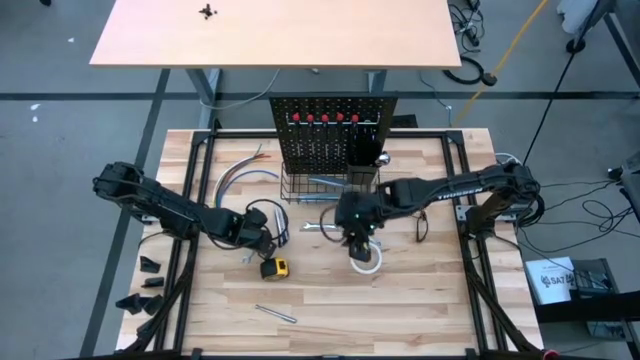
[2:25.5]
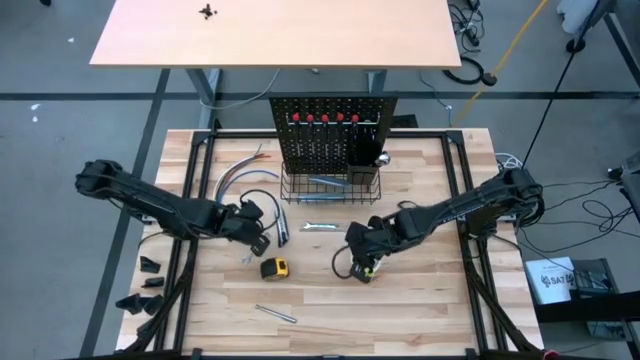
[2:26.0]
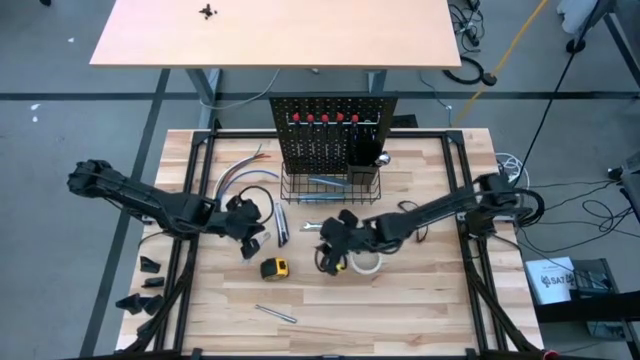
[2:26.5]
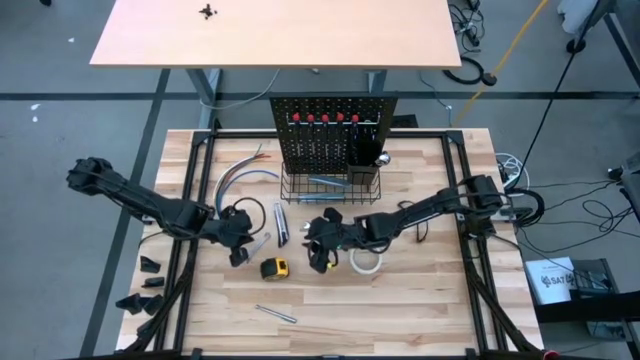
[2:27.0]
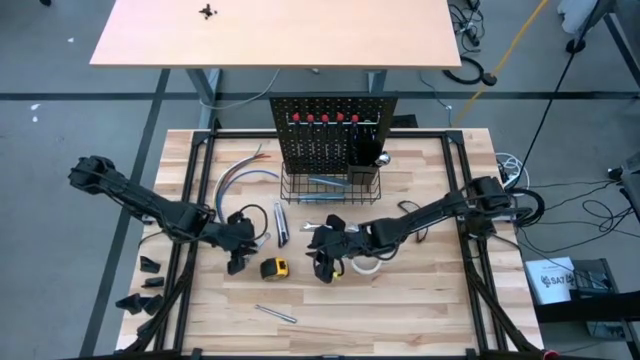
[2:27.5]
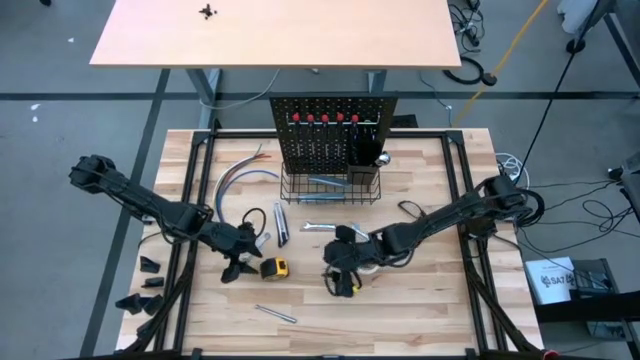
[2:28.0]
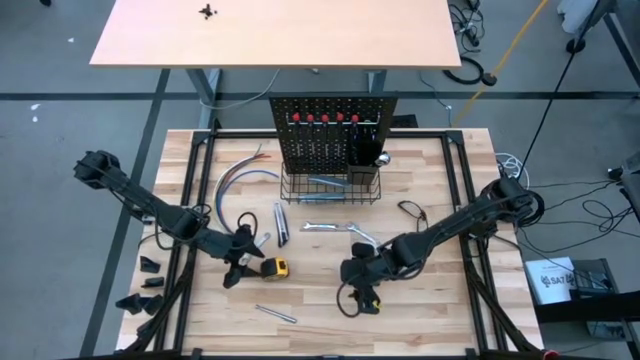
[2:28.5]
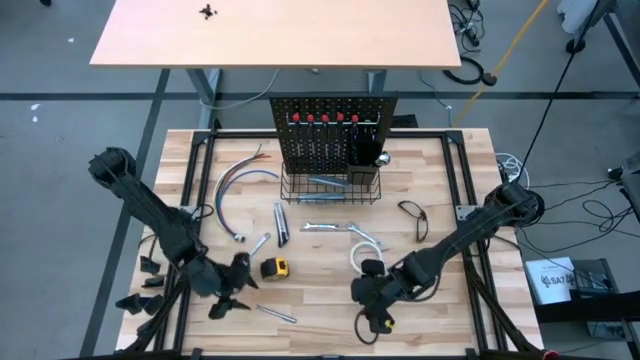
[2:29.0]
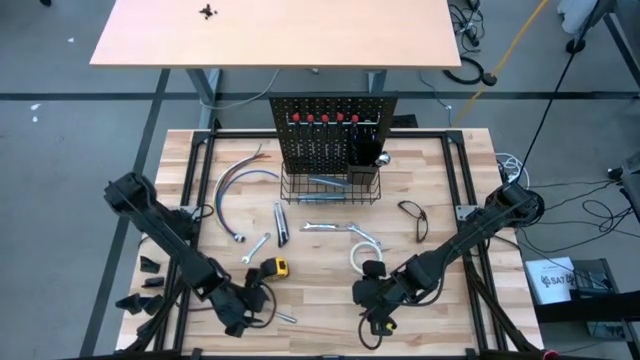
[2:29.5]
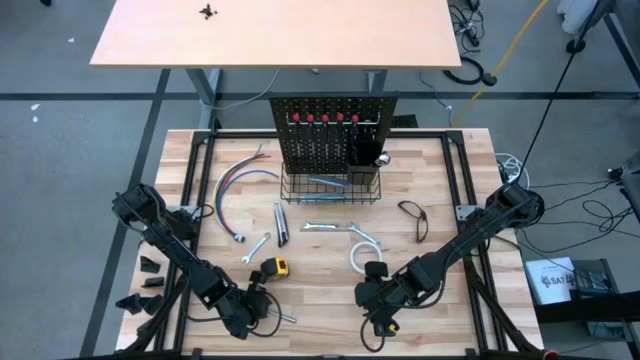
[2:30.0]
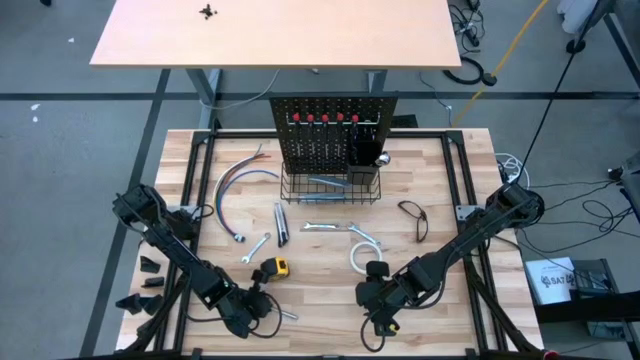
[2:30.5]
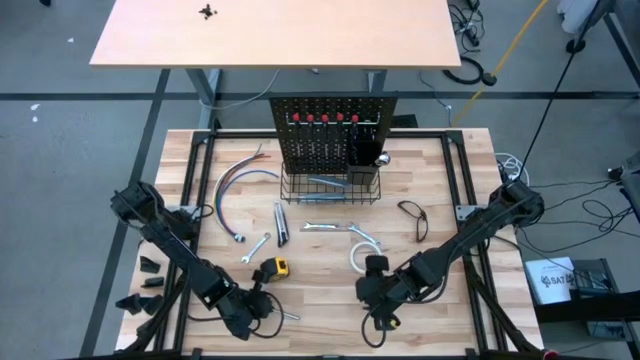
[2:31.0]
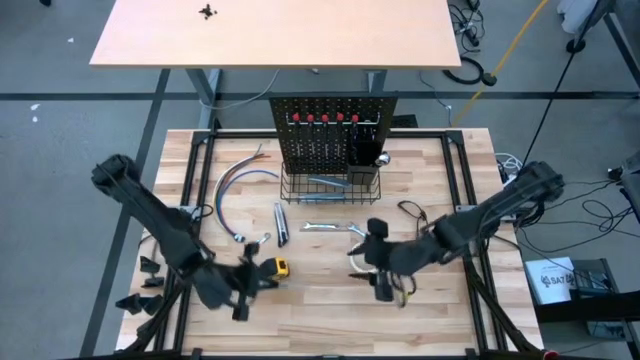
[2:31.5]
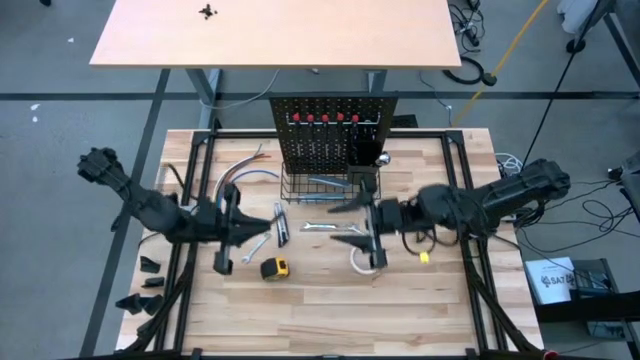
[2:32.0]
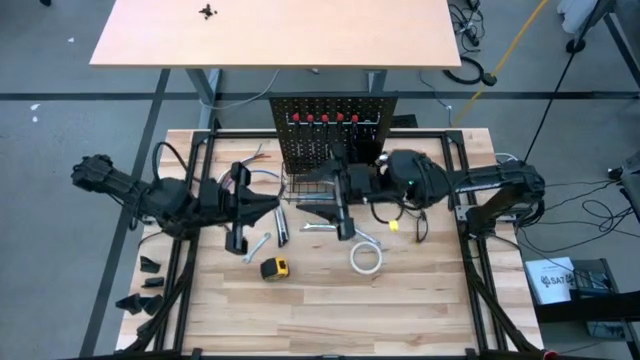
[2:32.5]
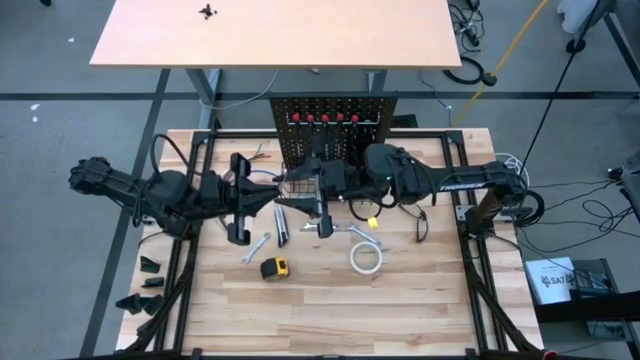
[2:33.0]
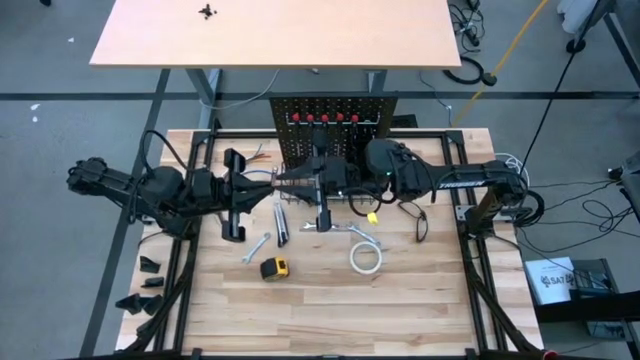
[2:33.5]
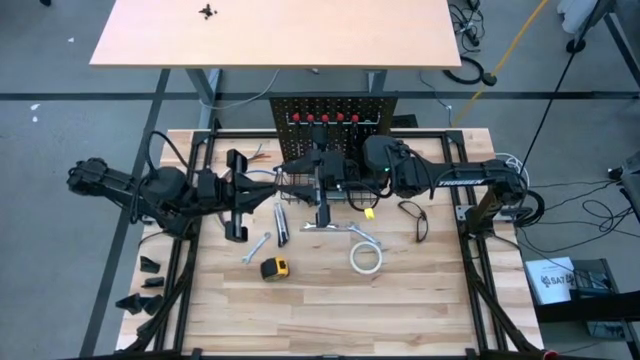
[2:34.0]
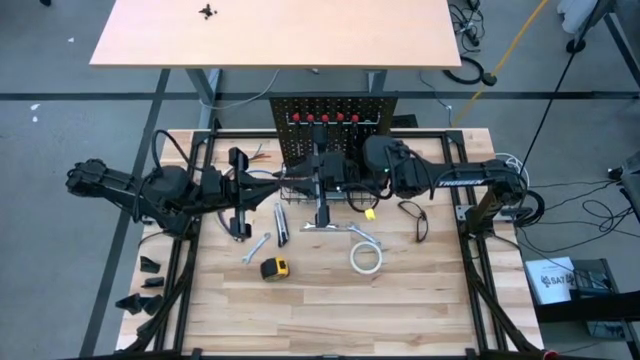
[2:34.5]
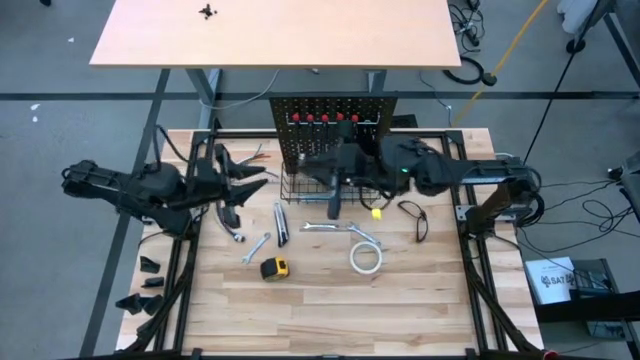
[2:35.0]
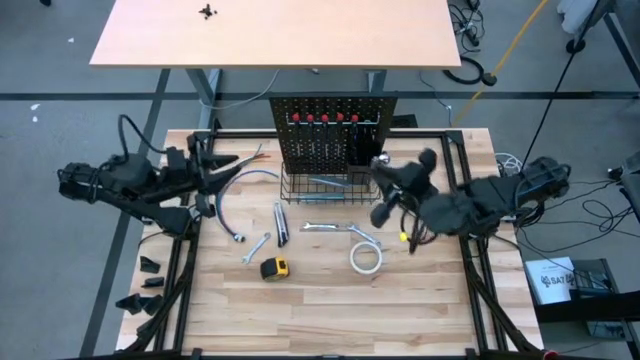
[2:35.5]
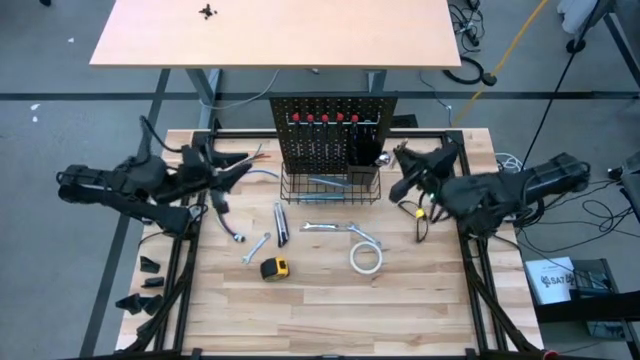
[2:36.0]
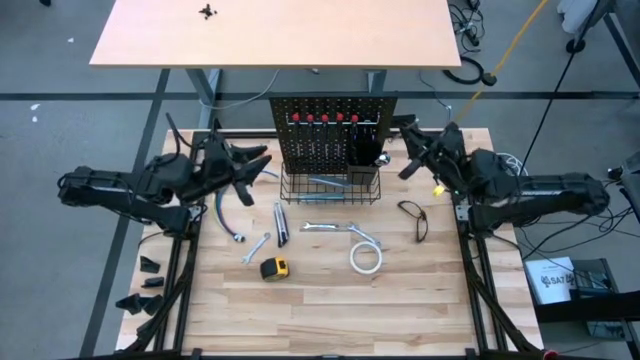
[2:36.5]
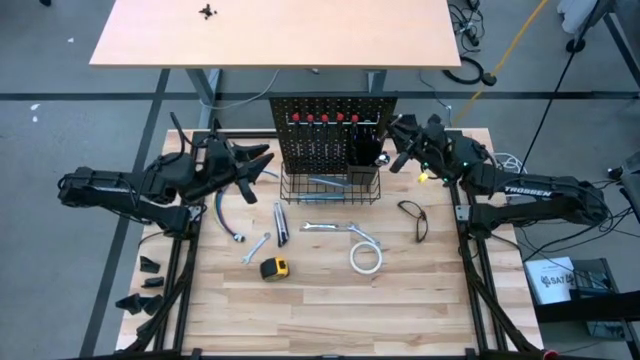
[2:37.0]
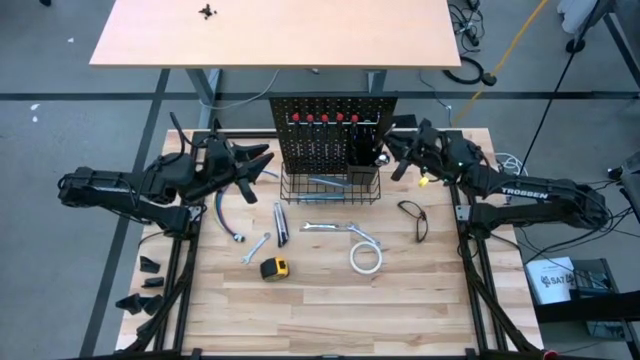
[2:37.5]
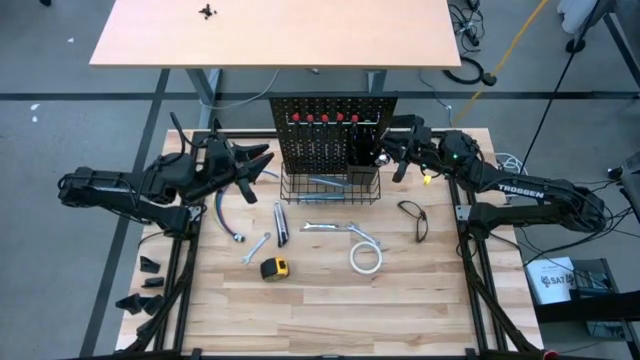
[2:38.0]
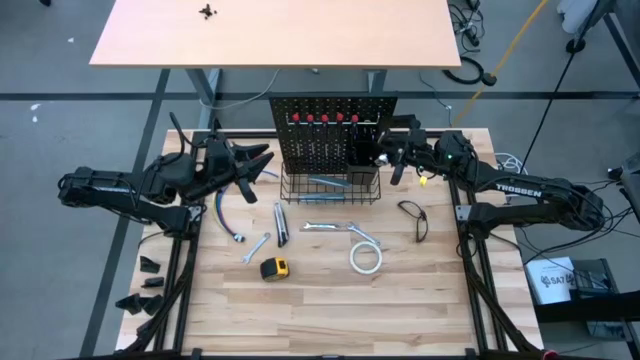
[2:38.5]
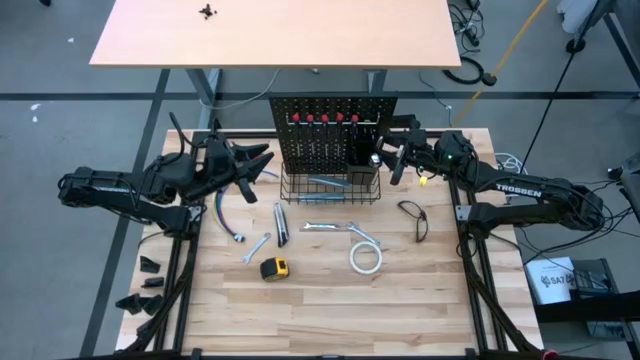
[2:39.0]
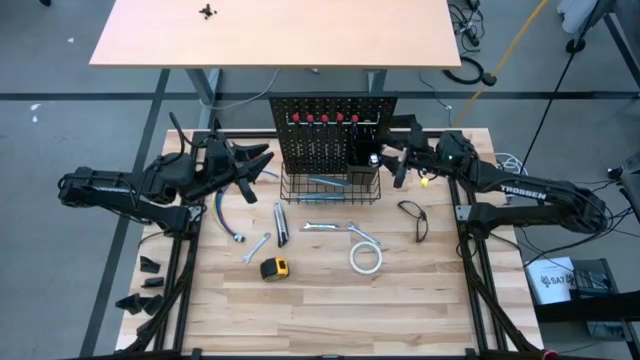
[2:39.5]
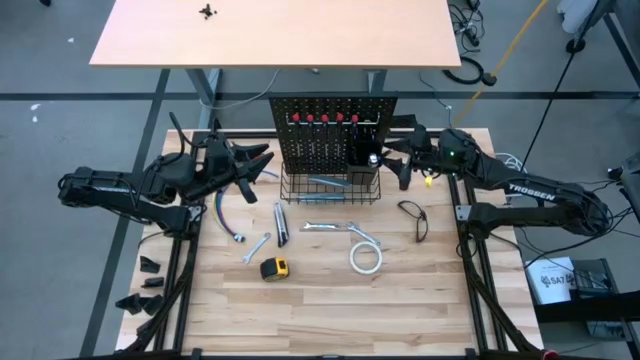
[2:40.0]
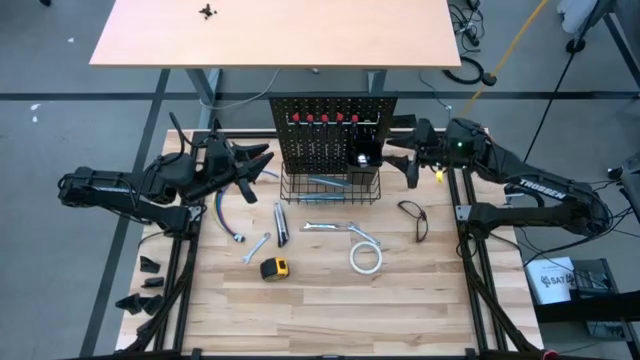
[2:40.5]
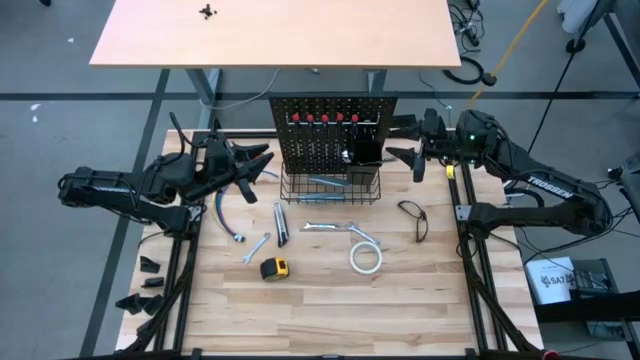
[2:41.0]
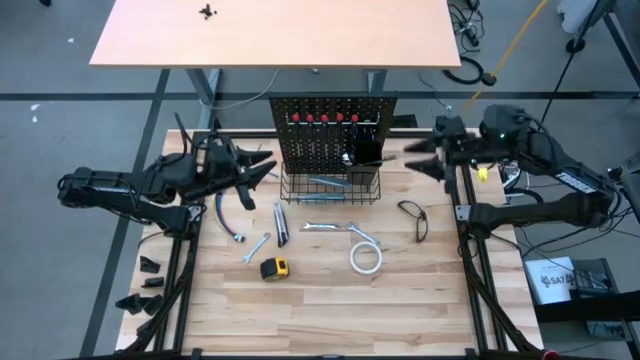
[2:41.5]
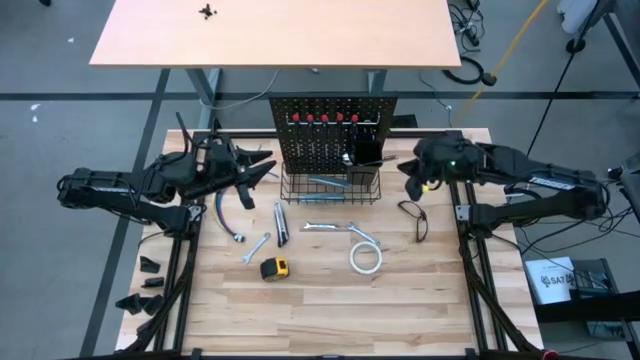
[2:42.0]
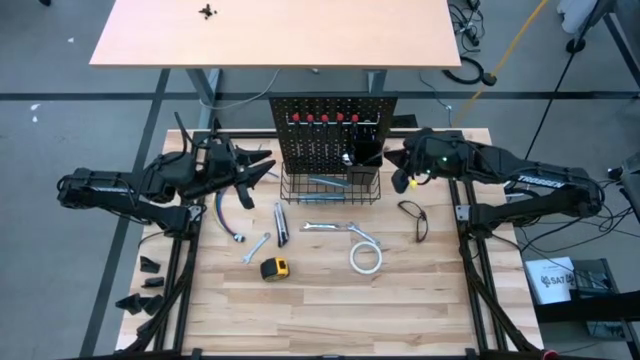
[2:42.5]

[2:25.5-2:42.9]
Task: Hang tools onto peg board
Put the silver pen into the pegboard bin

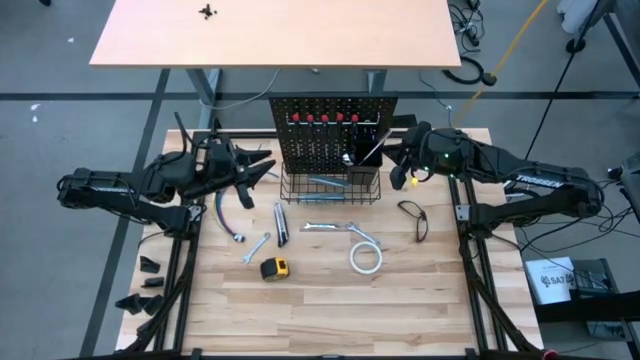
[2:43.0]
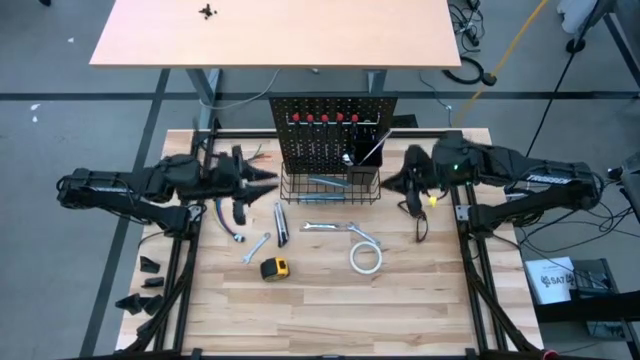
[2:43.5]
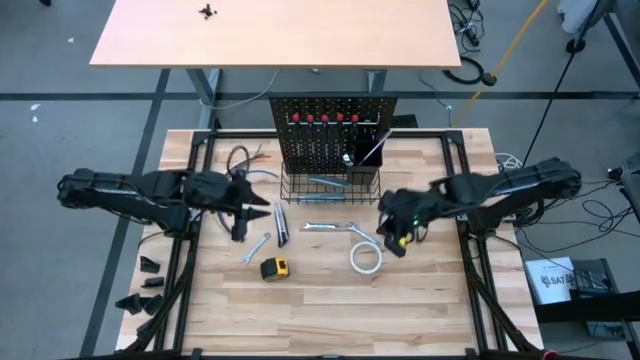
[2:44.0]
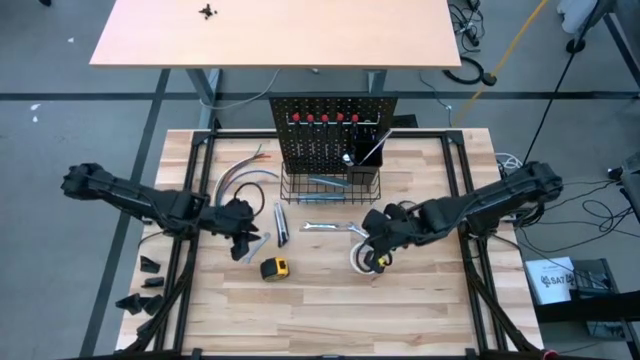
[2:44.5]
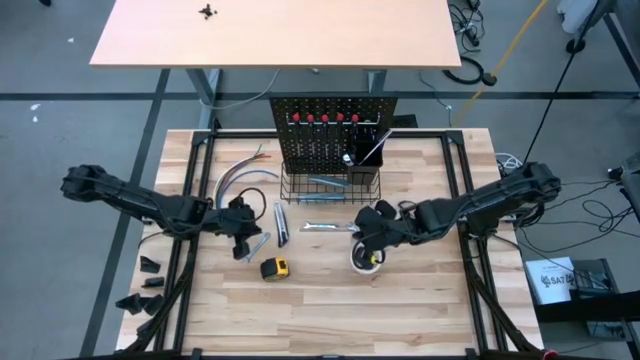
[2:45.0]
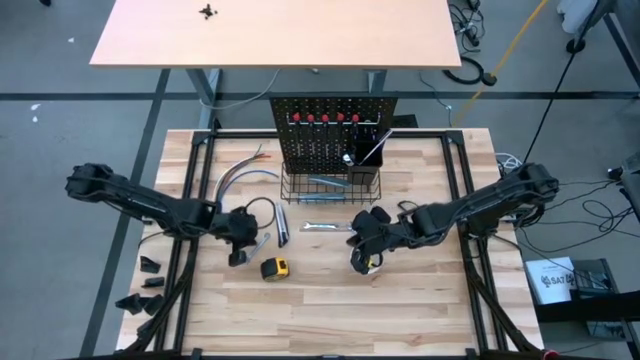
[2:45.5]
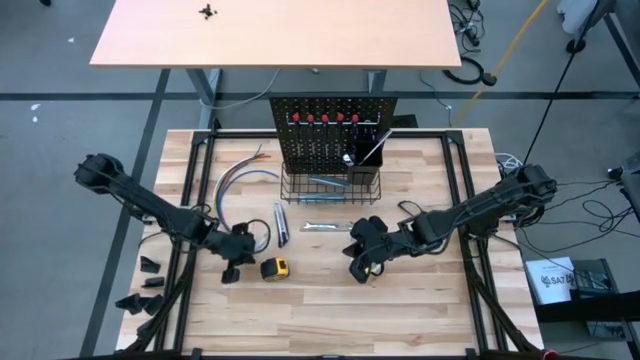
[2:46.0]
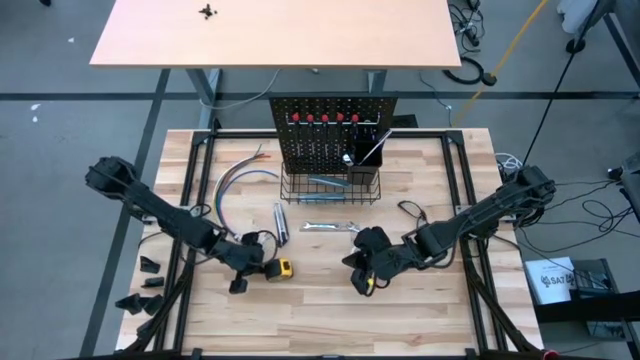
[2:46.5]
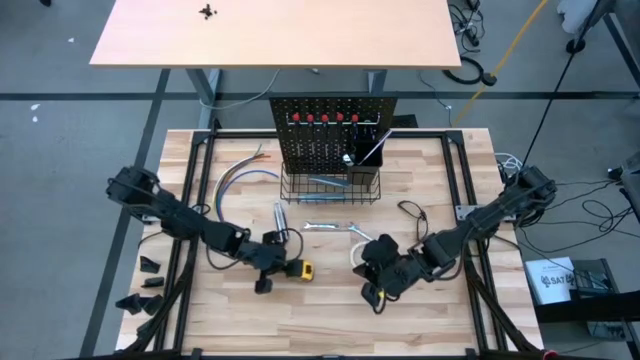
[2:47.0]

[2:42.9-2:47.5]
Move the measuring tape to the center of the table
